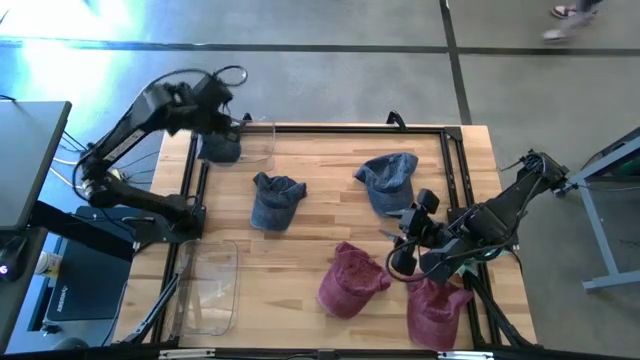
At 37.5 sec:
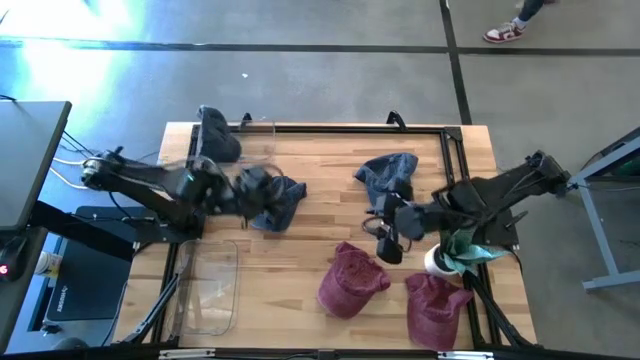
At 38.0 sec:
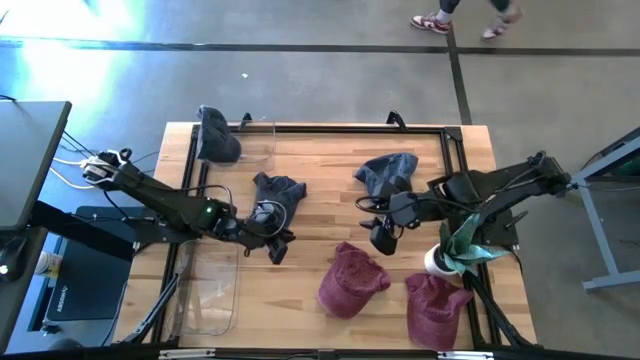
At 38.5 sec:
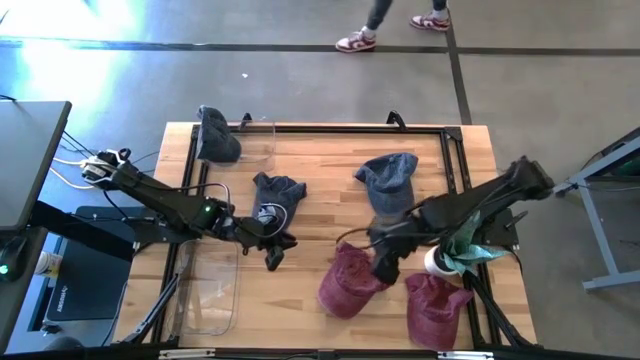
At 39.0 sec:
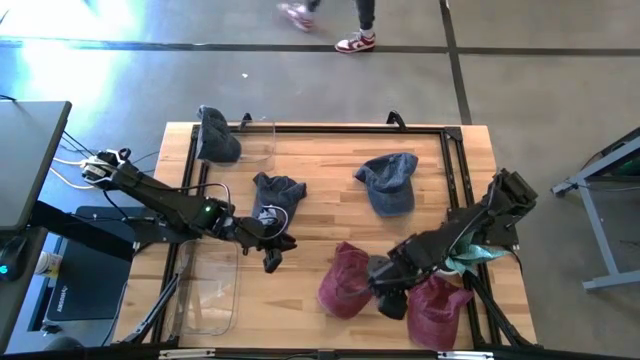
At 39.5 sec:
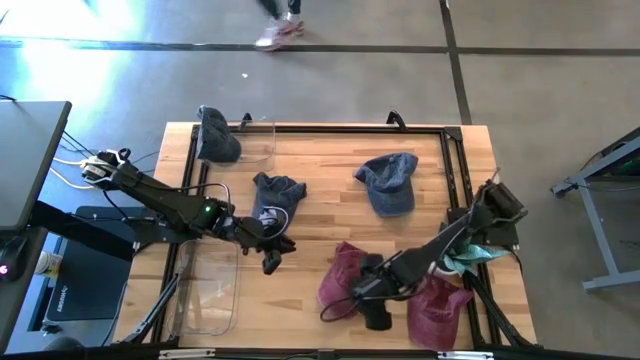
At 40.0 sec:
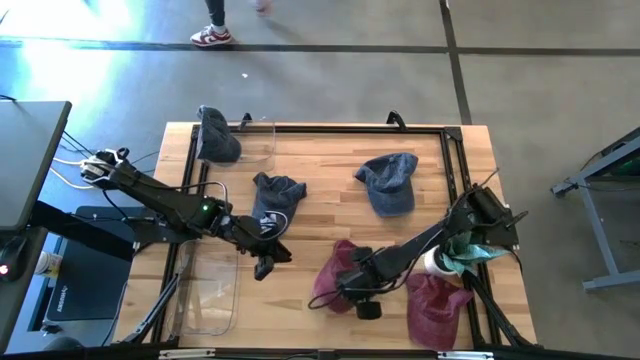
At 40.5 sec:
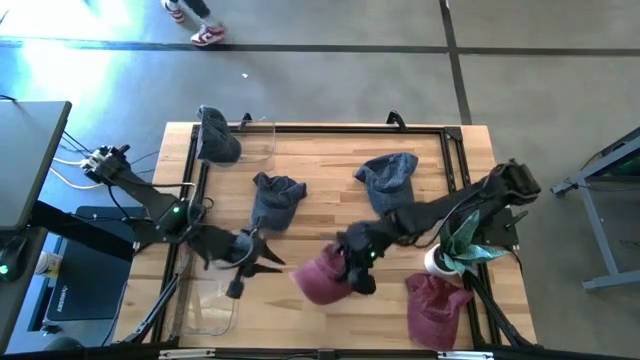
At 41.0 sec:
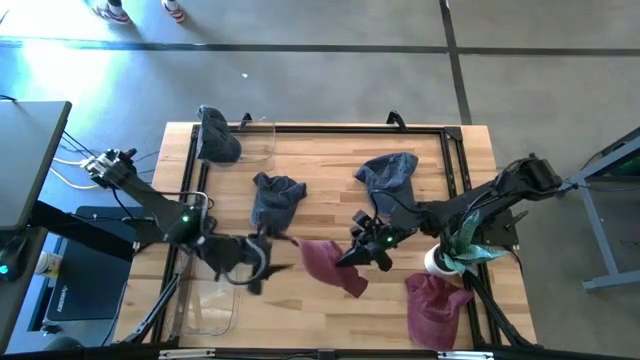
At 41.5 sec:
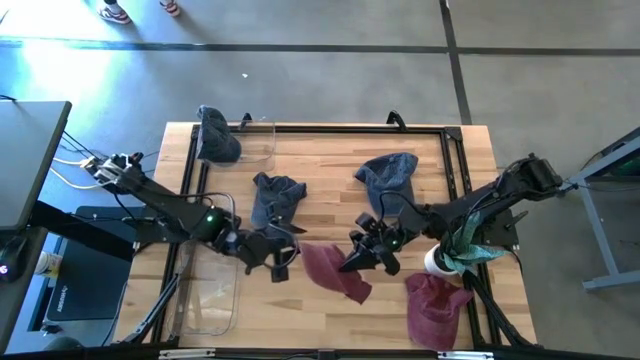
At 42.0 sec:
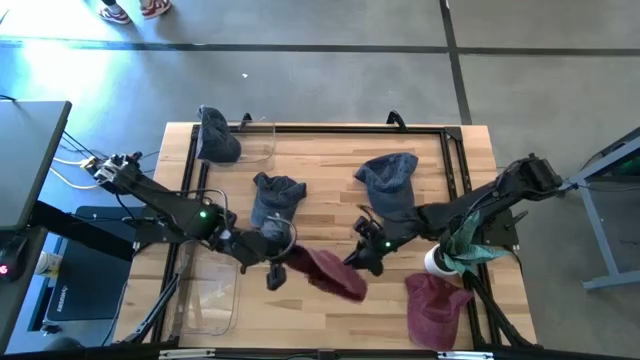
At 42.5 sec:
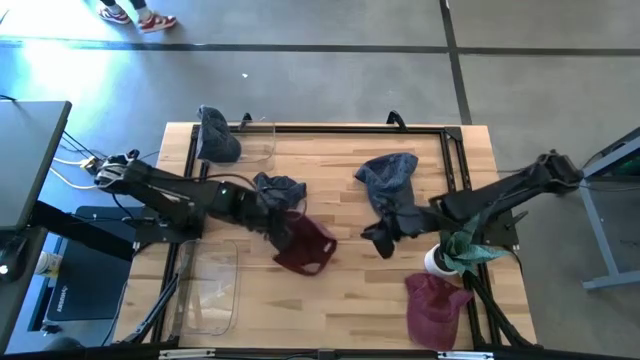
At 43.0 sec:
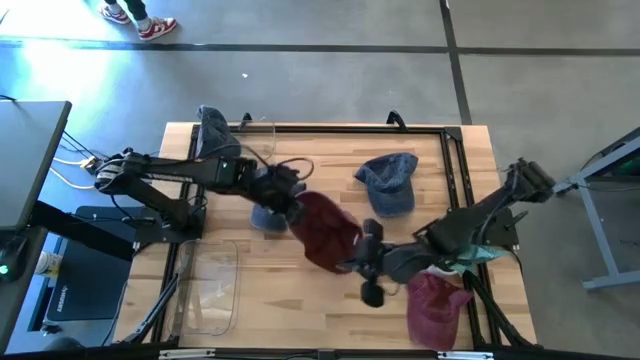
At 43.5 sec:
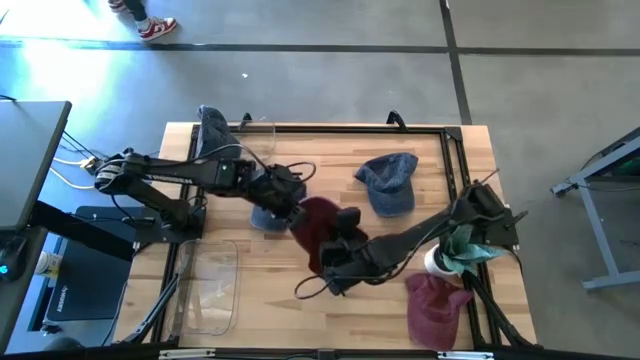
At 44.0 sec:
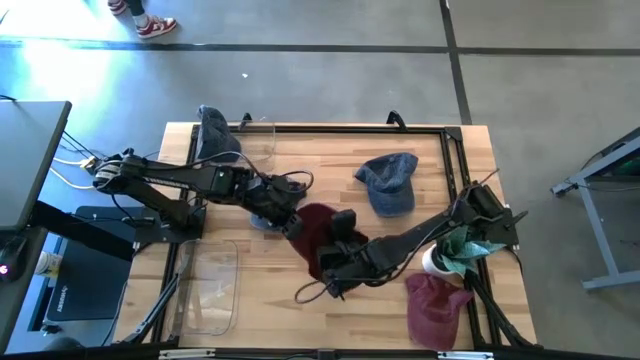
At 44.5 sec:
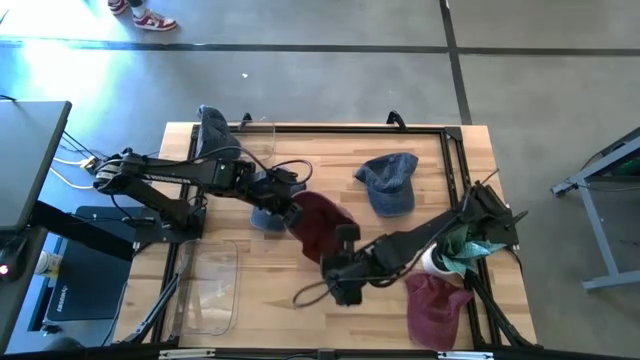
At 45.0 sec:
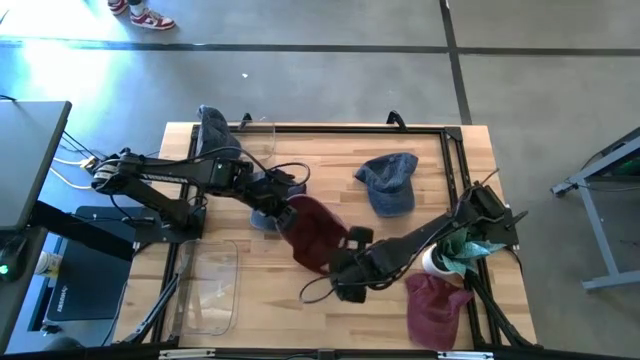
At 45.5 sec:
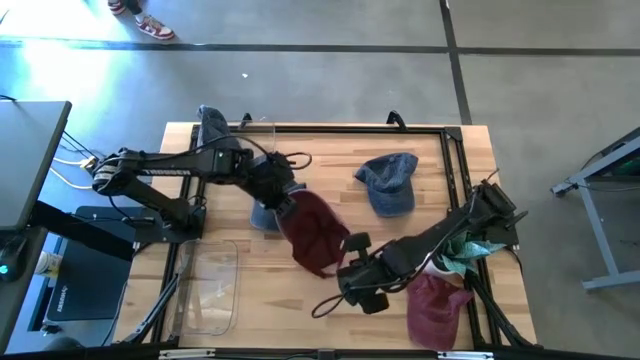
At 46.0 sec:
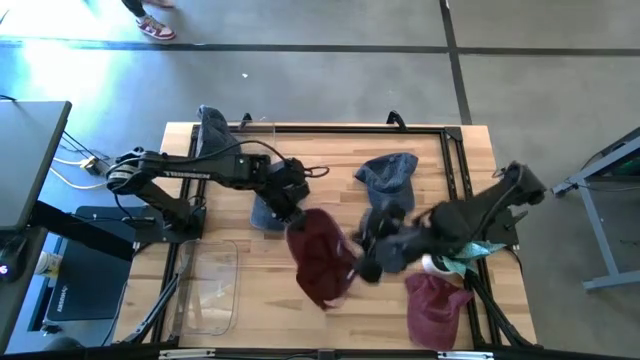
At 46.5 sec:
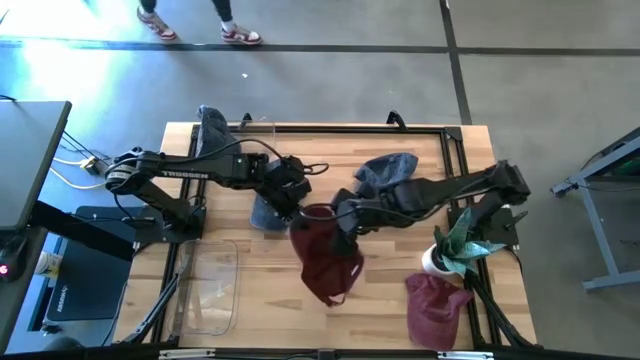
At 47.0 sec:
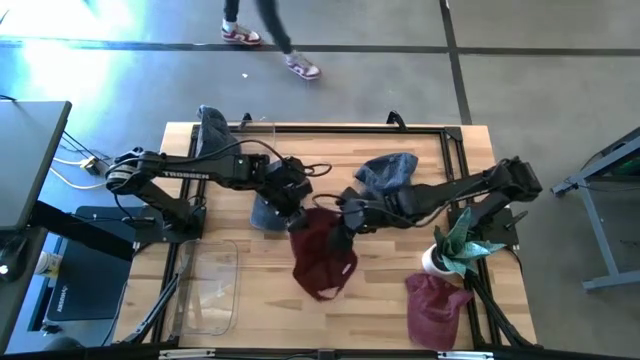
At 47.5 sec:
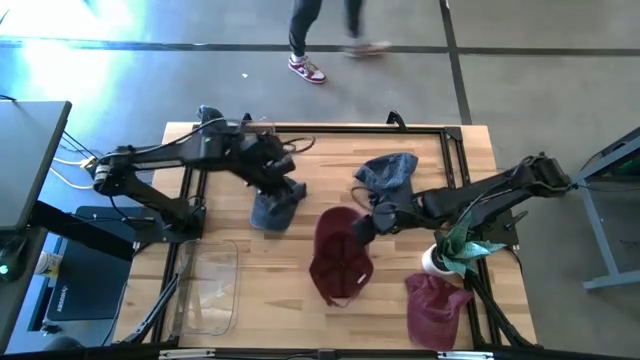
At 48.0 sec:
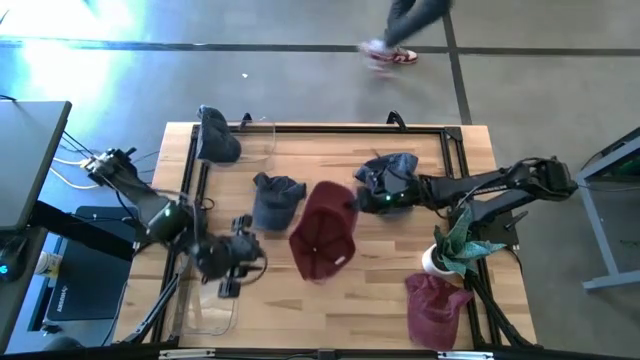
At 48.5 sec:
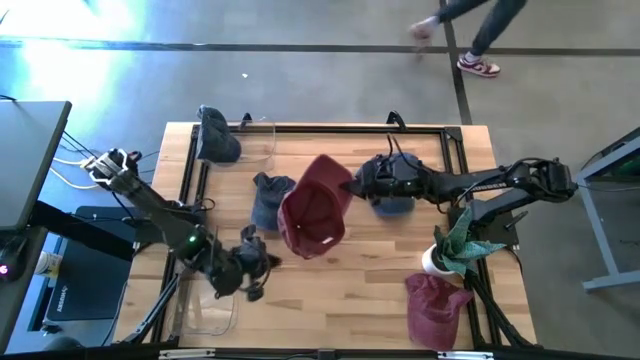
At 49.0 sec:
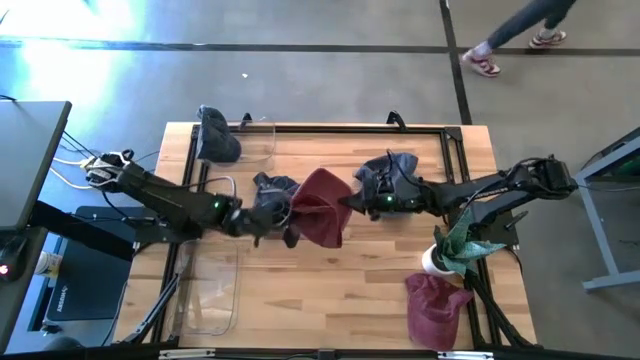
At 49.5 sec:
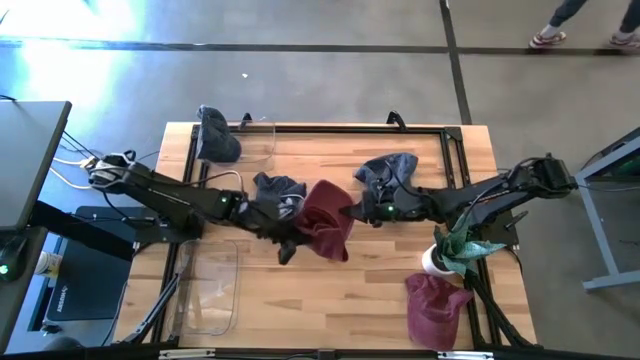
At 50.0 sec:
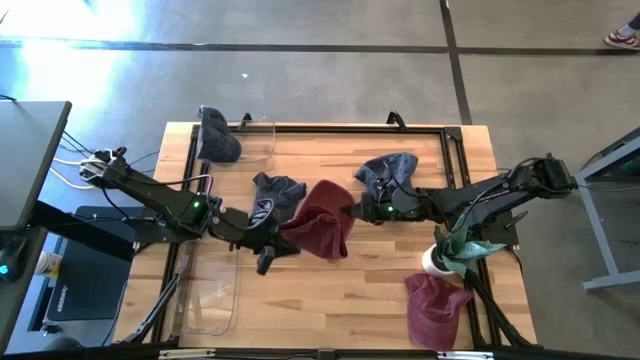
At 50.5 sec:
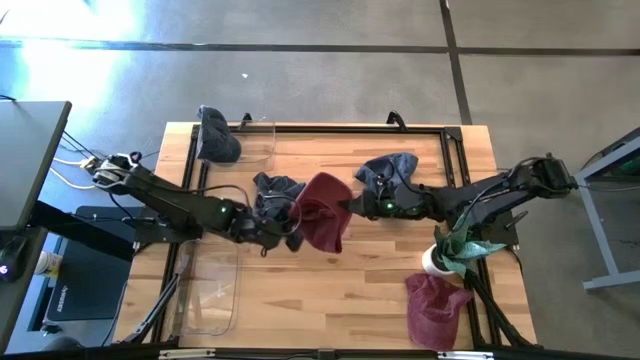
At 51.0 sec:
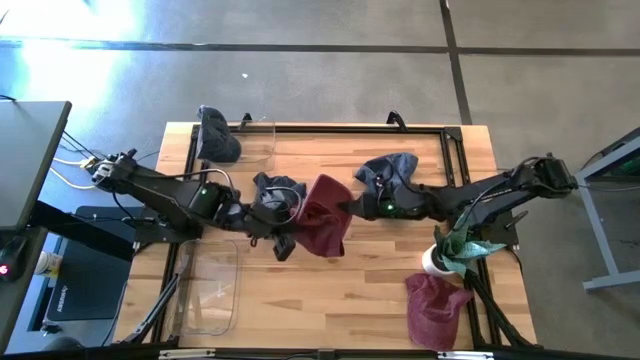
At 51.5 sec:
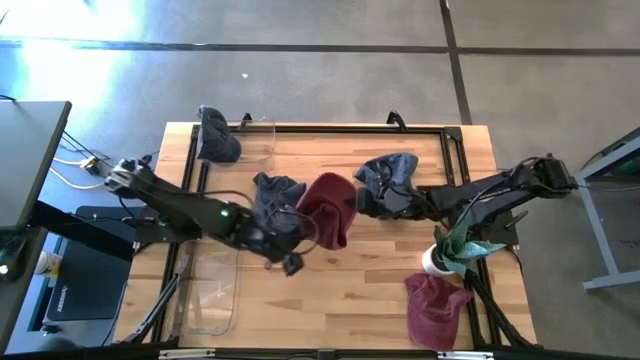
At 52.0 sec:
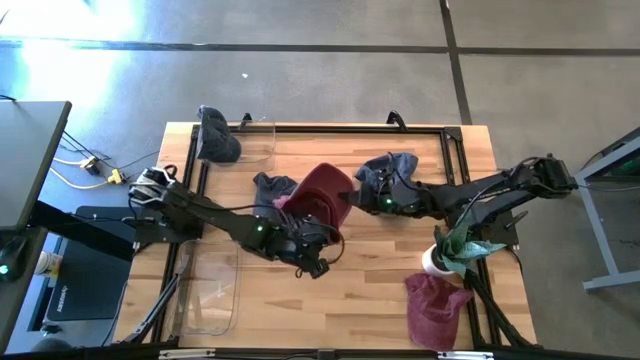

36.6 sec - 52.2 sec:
Task: Pick & Place hat
Put the left red cap into the bottom transparent bin
